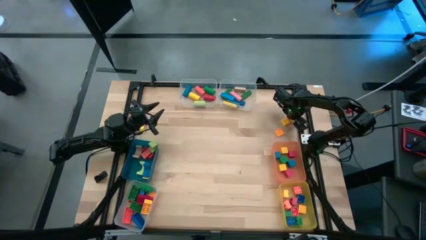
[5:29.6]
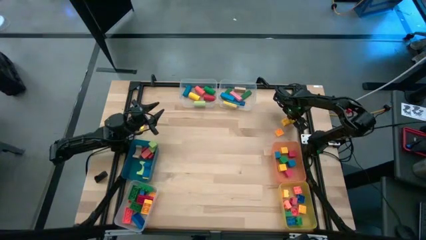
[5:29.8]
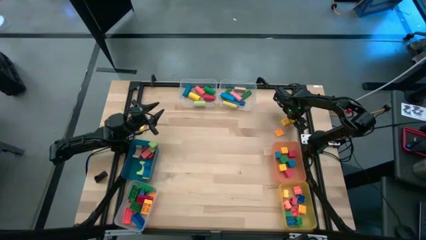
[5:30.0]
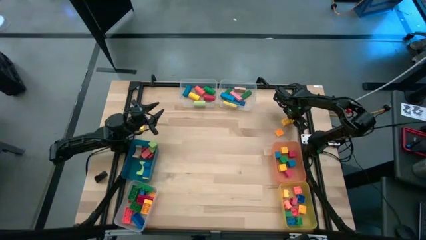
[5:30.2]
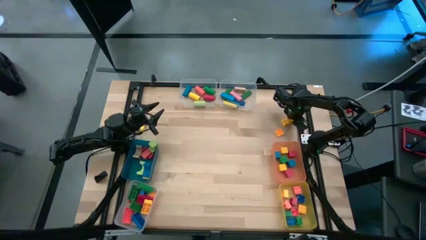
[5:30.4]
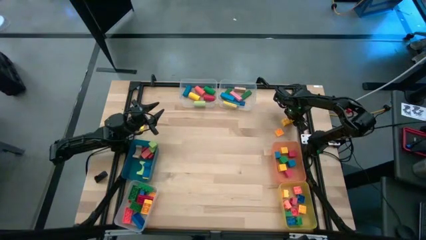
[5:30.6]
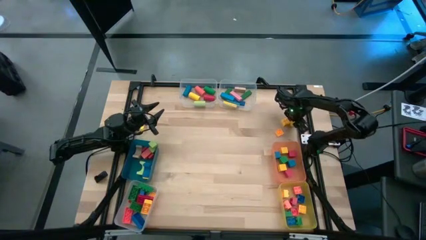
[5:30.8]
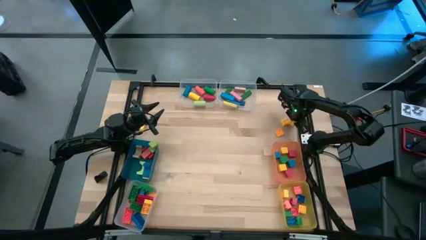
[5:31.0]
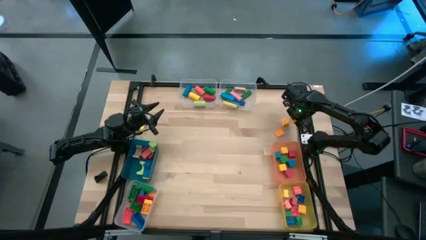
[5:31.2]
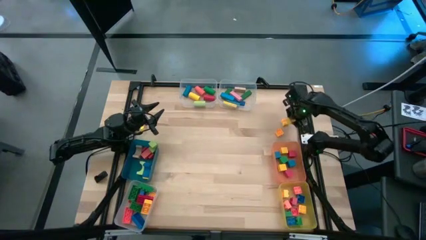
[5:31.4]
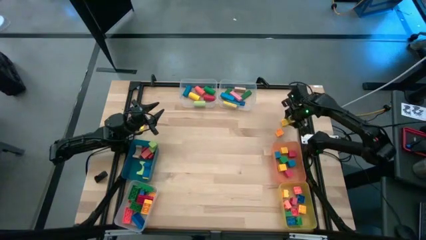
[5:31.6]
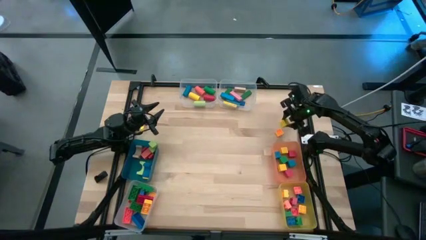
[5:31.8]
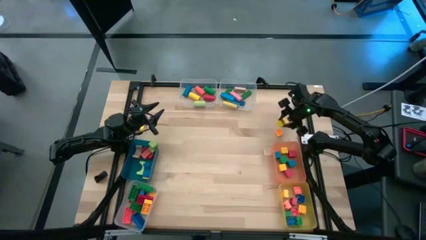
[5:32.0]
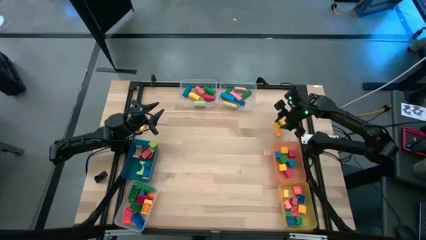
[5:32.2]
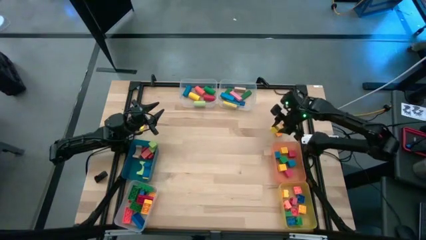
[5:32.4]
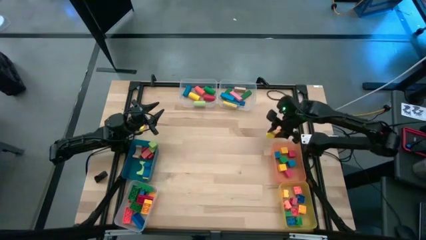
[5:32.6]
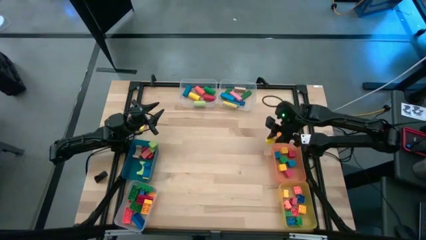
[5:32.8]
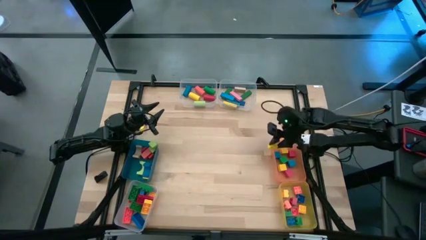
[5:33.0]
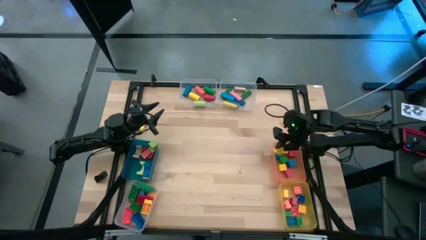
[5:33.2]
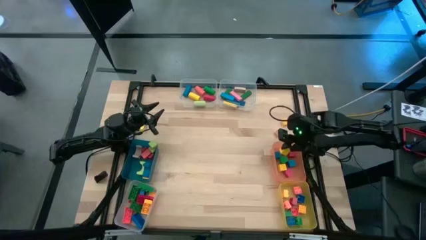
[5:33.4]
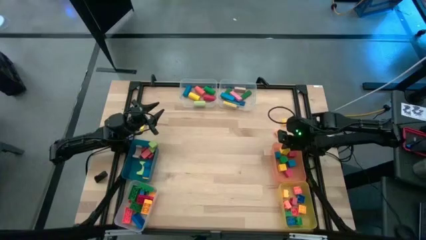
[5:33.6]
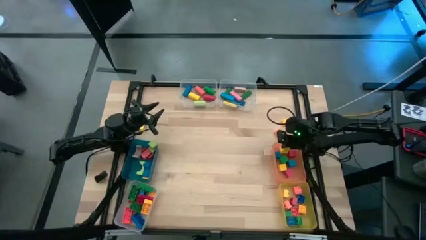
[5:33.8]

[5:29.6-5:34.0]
Task: Sort blocks by size
Put the yellow block into the orange bin

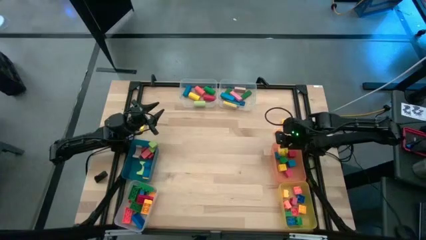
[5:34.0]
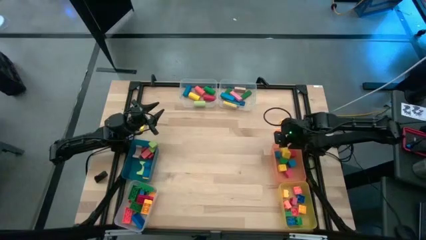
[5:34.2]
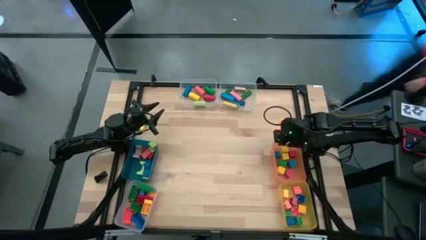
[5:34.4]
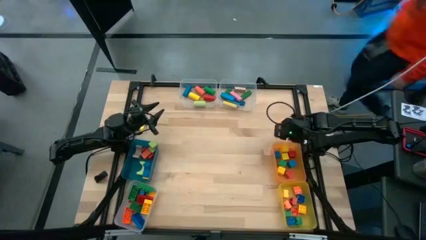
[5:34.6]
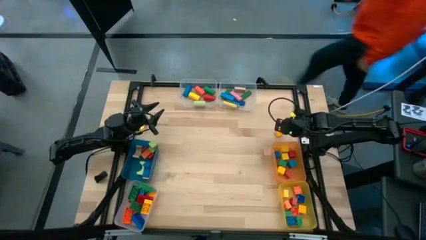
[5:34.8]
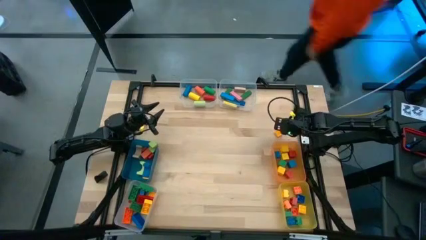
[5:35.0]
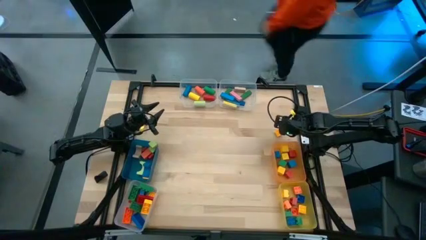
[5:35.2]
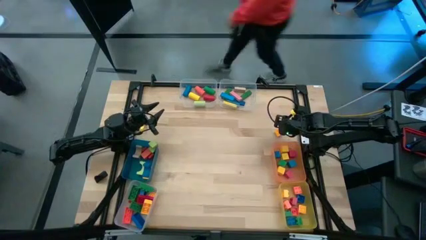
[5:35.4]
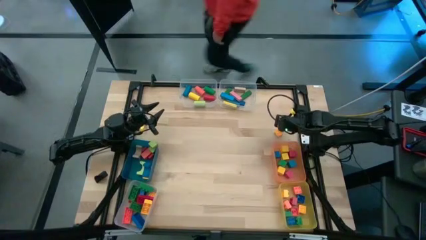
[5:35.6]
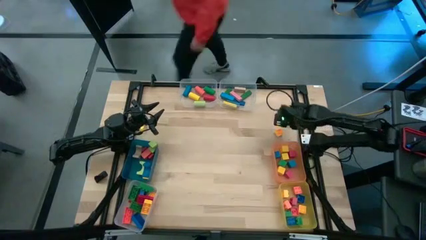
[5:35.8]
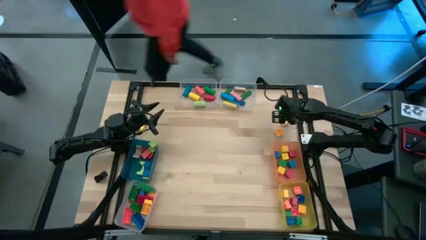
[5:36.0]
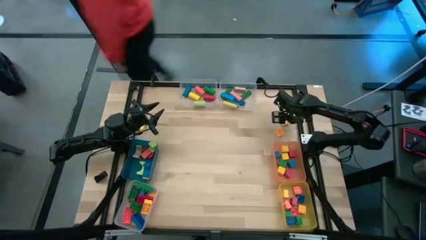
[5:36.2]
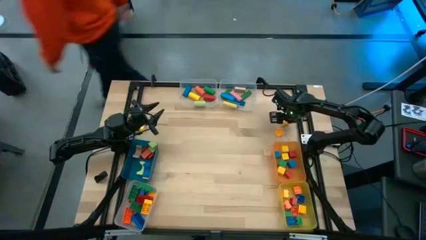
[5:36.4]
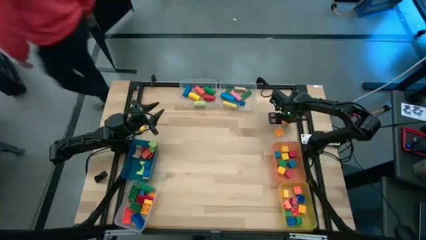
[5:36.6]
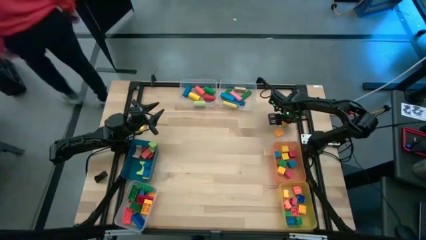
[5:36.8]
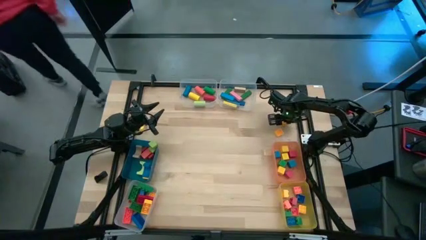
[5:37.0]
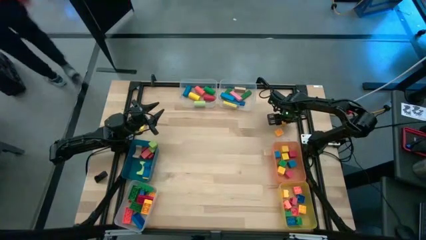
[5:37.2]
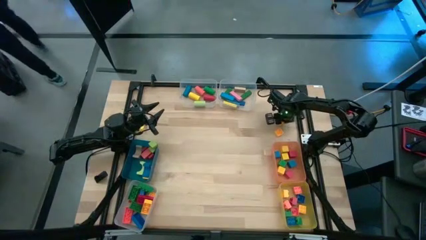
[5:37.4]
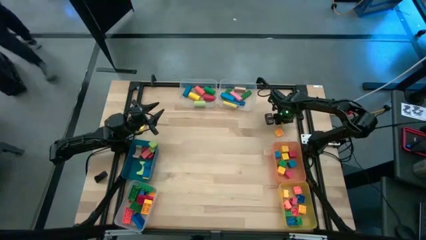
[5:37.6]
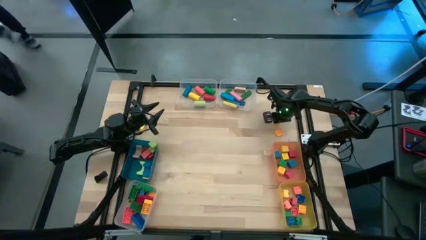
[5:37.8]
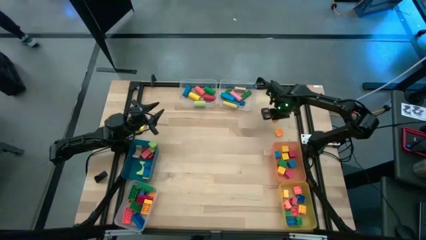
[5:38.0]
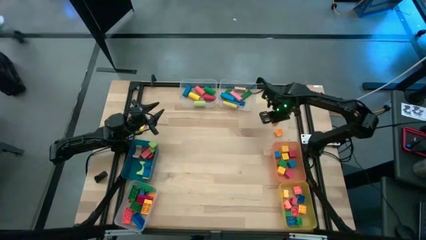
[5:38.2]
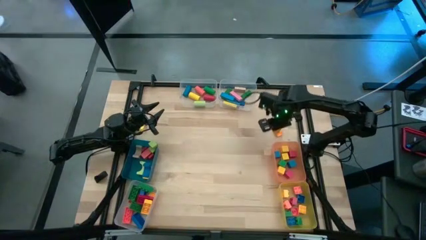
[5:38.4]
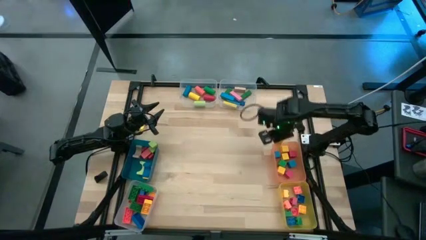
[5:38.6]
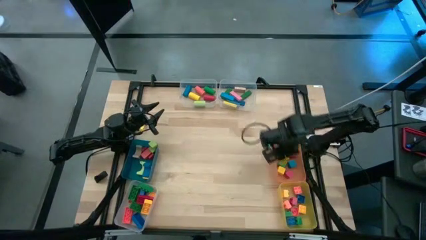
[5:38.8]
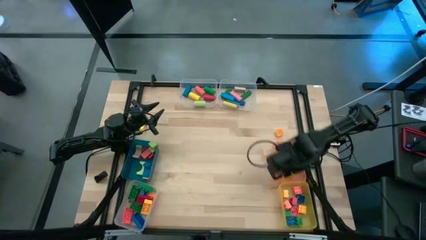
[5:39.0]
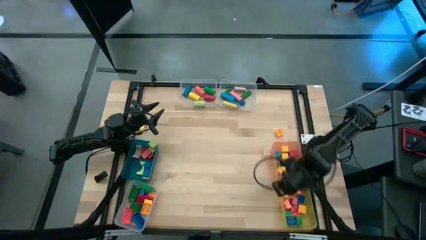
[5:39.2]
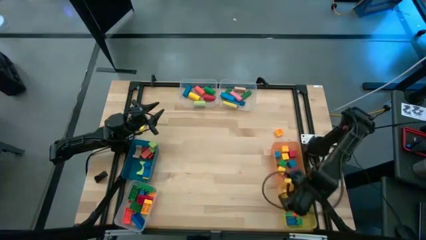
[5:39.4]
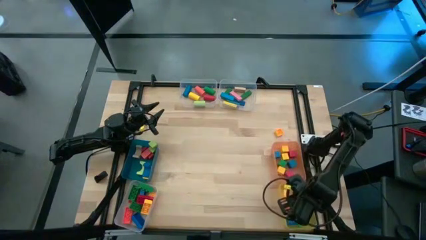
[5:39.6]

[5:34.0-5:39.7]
Put the yellow game piece into the yellow bin

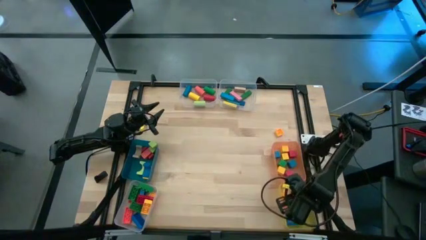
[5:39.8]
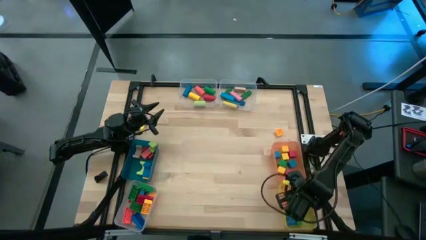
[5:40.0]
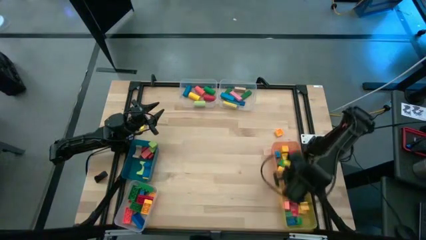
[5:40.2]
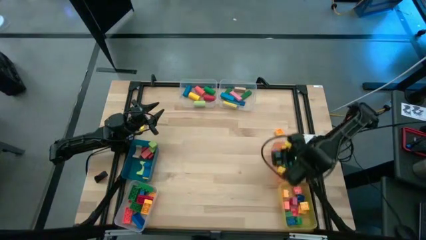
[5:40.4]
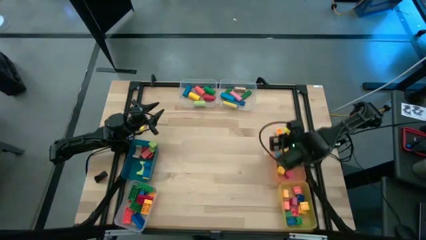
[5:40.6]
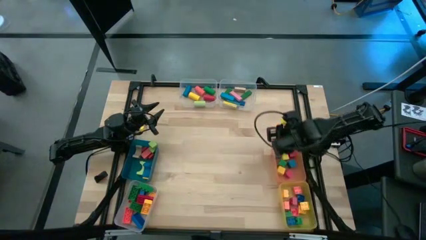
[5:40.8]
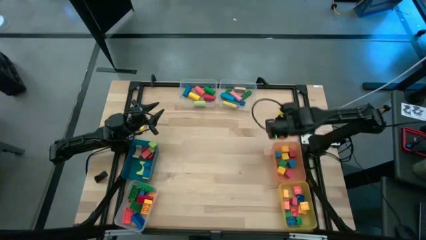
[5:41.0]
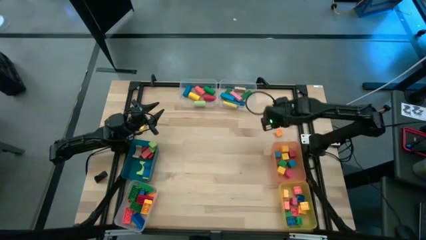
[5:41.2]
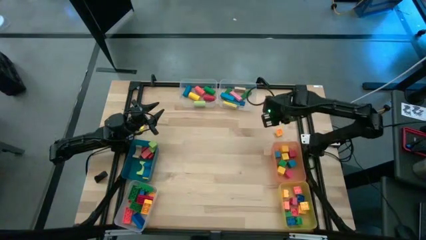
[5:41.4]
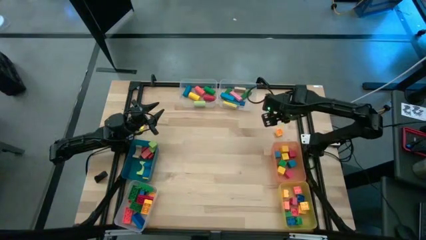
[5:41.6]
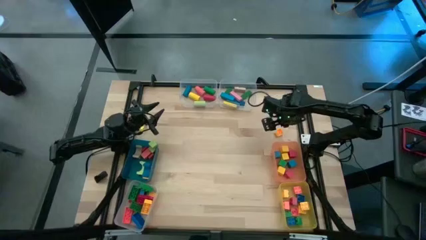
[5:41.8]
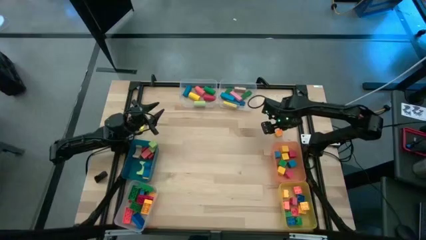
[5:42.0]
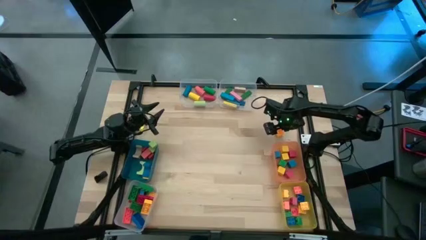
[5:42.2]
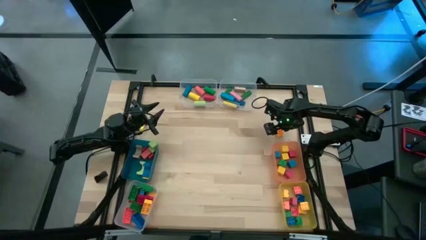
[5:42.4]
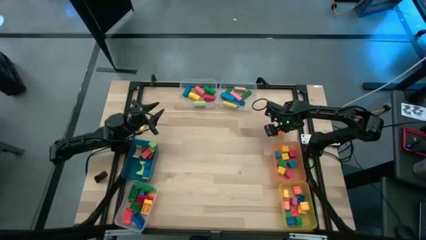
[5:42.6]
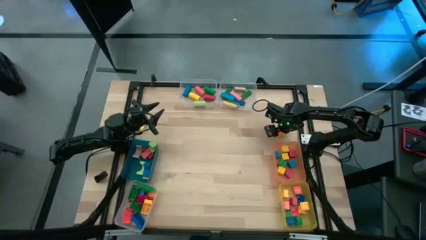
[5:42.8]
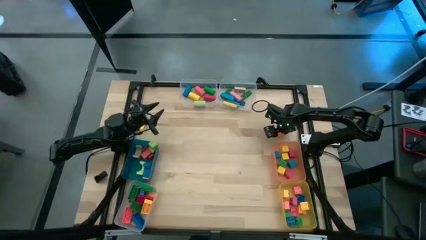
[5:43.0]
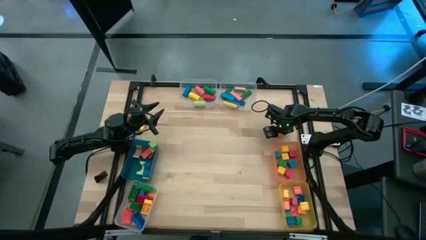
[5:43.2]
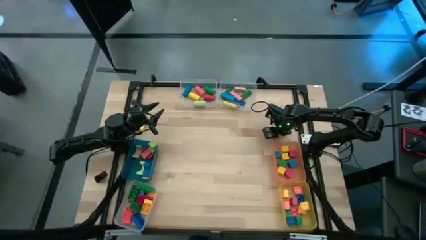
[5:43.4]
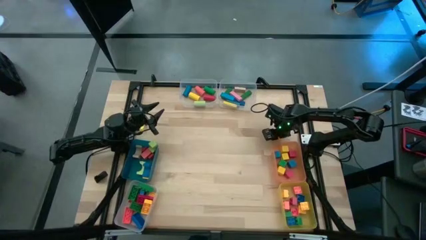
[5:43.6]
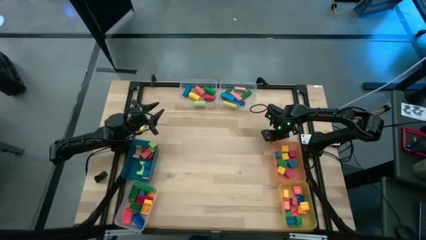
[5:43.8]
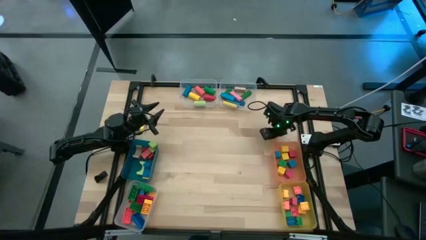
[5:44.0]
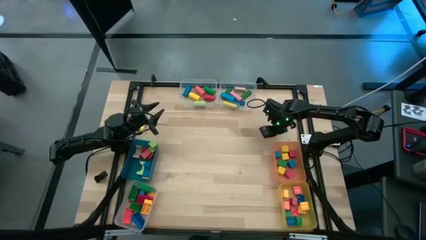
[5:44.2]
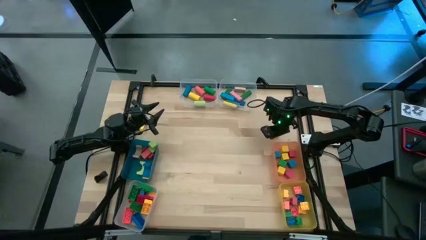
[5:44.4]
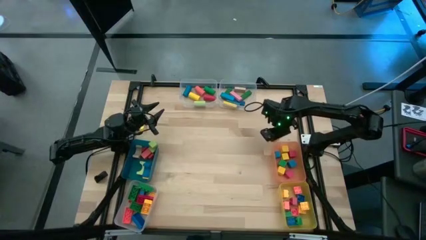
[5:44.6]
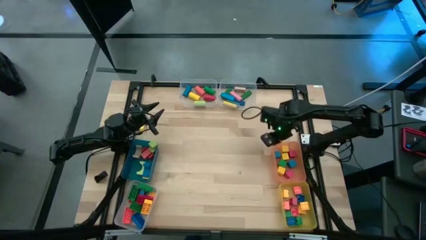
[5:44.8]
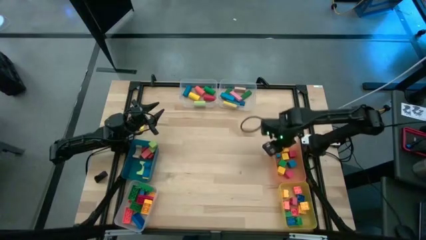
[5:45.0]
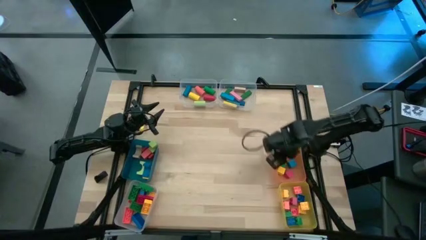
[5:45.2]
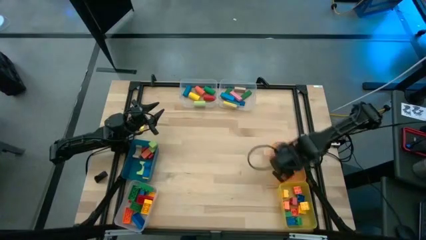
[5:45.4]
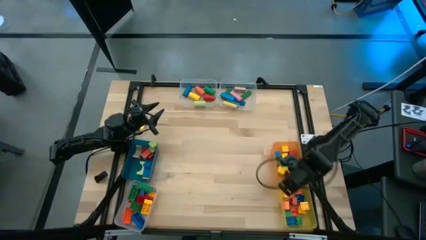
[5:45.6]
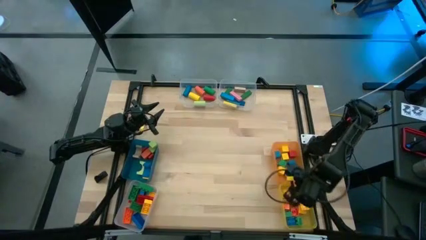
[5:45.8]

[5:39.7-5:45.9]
Put the yellow game piece into the yellow bin
